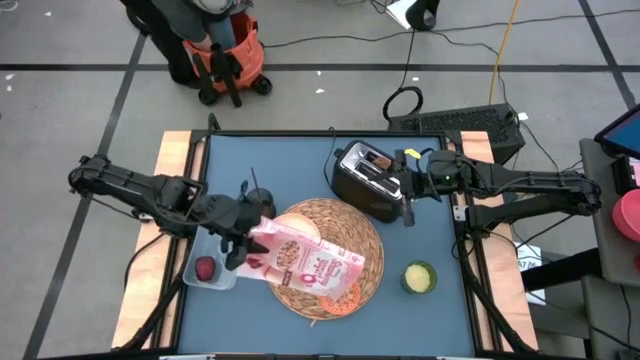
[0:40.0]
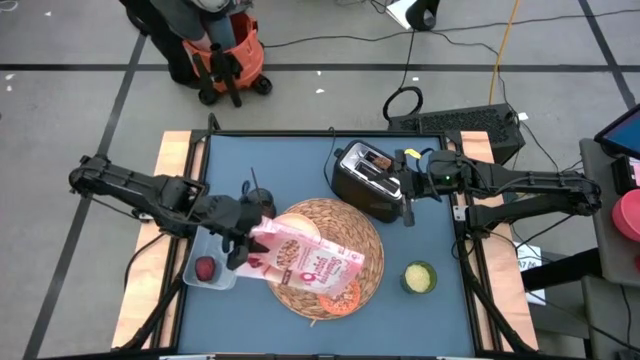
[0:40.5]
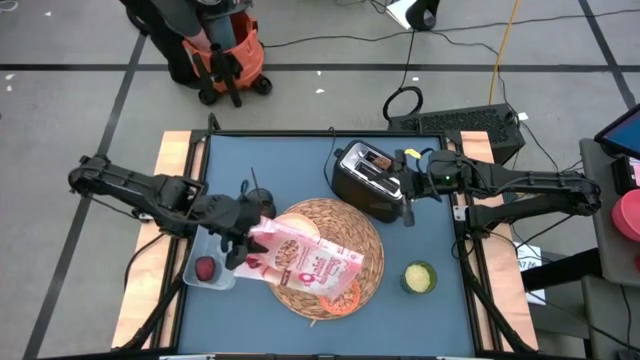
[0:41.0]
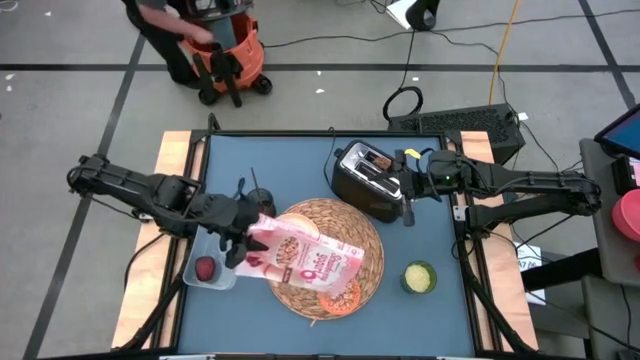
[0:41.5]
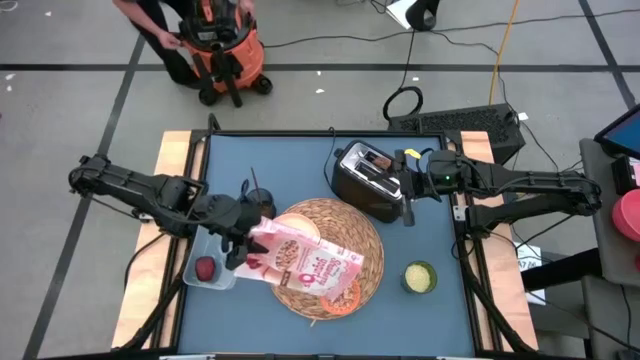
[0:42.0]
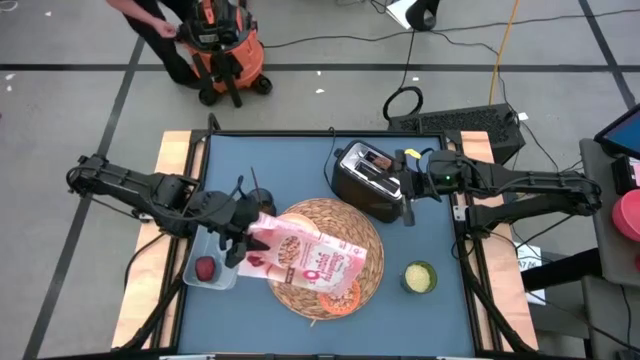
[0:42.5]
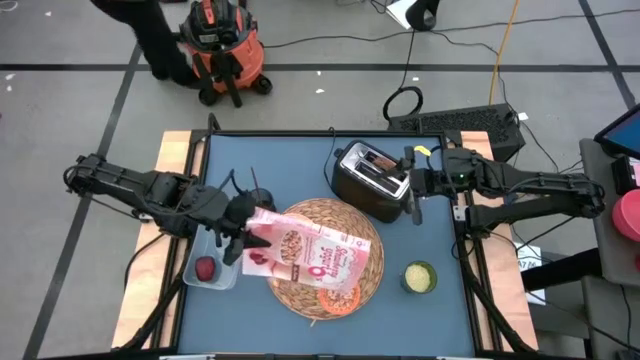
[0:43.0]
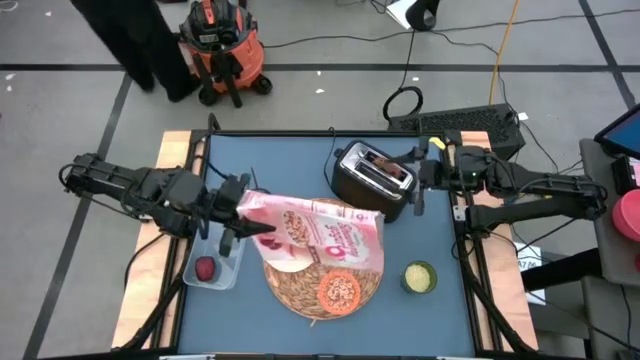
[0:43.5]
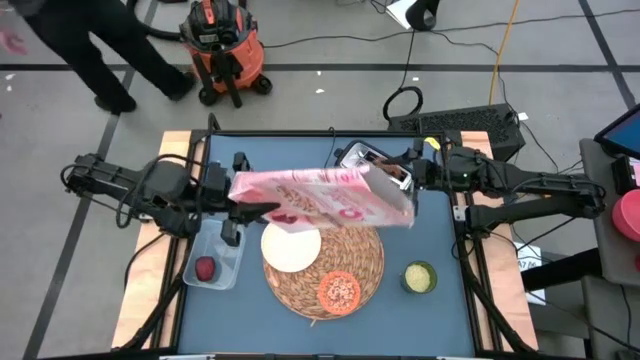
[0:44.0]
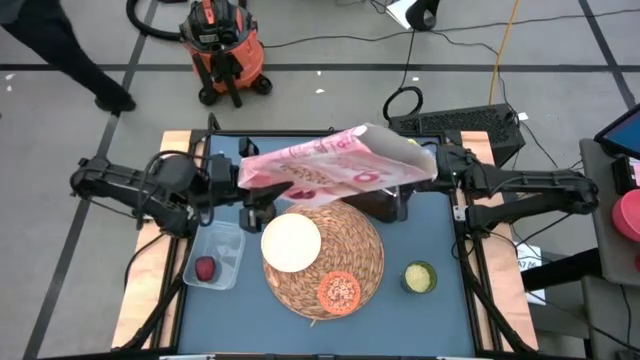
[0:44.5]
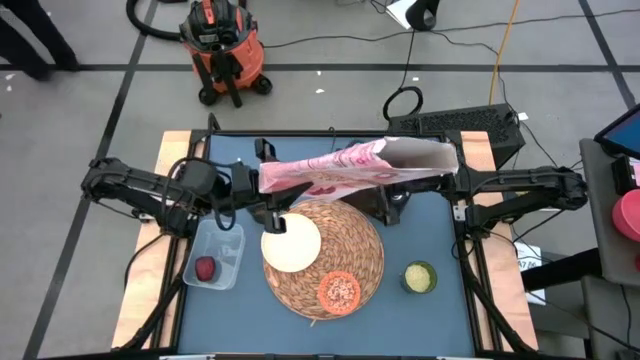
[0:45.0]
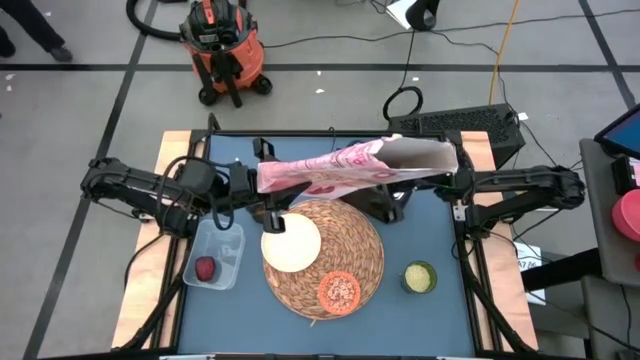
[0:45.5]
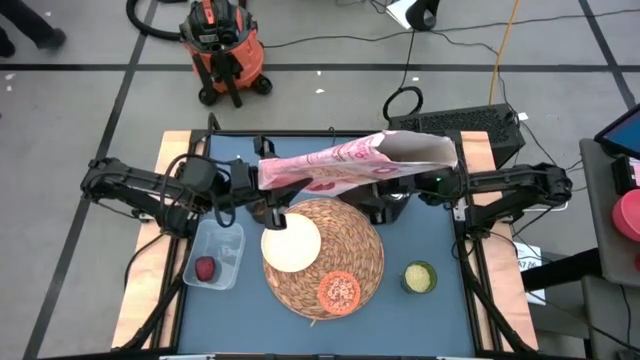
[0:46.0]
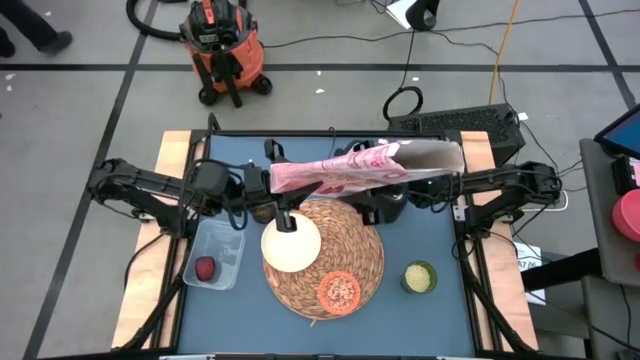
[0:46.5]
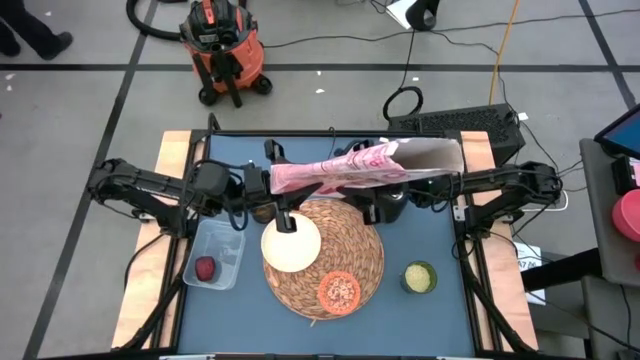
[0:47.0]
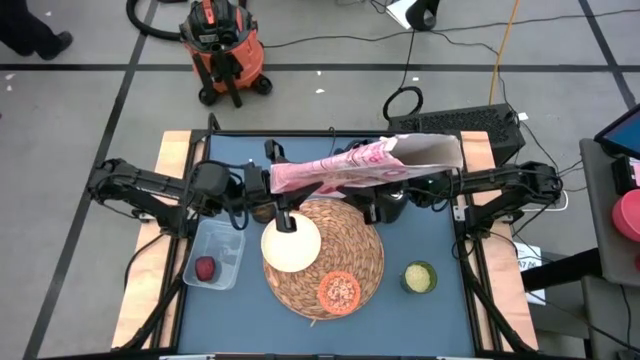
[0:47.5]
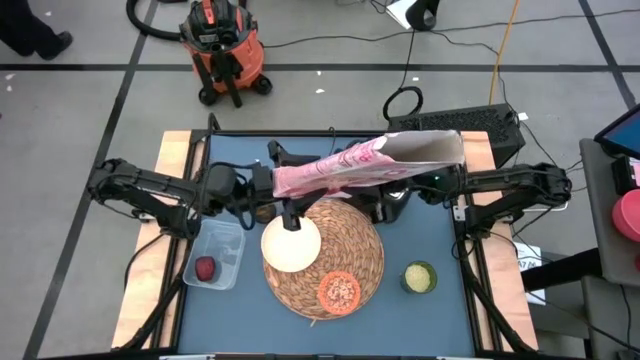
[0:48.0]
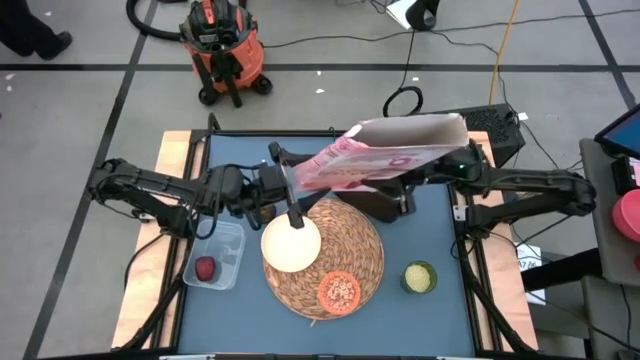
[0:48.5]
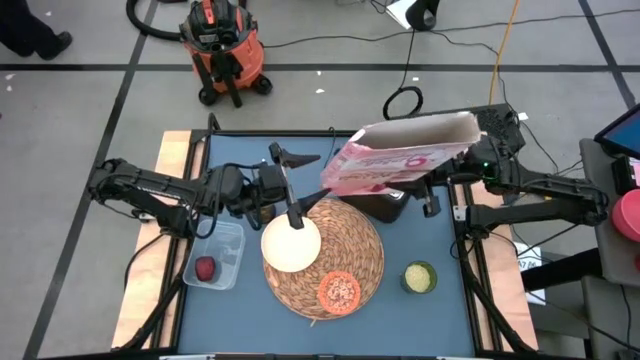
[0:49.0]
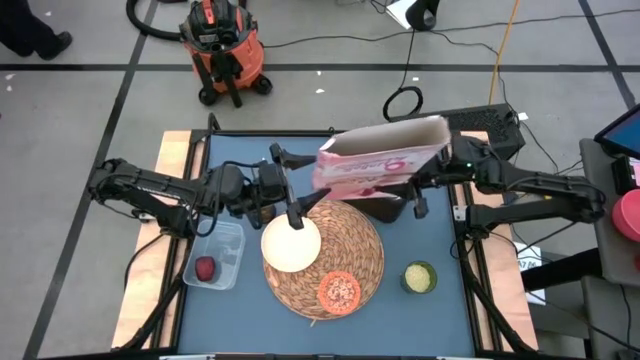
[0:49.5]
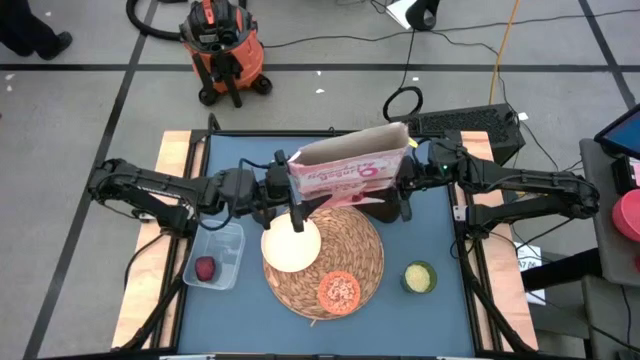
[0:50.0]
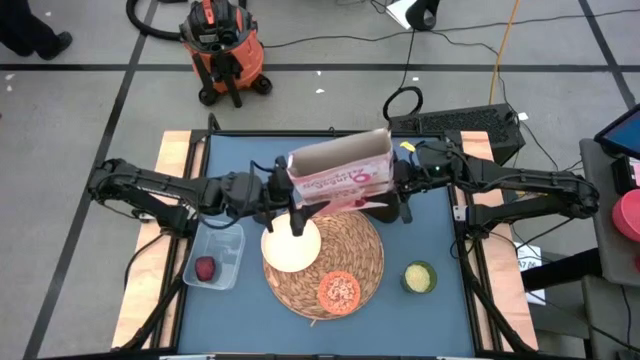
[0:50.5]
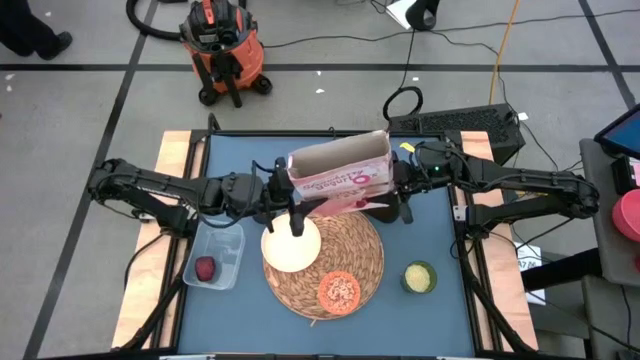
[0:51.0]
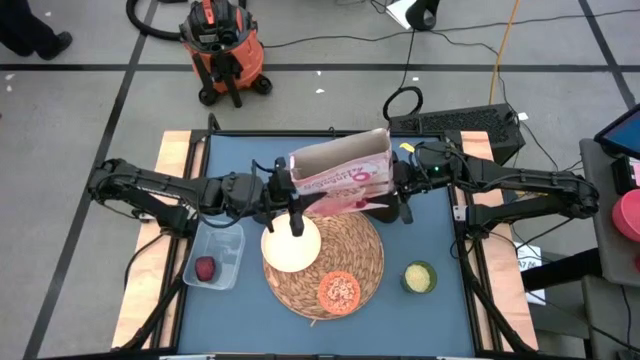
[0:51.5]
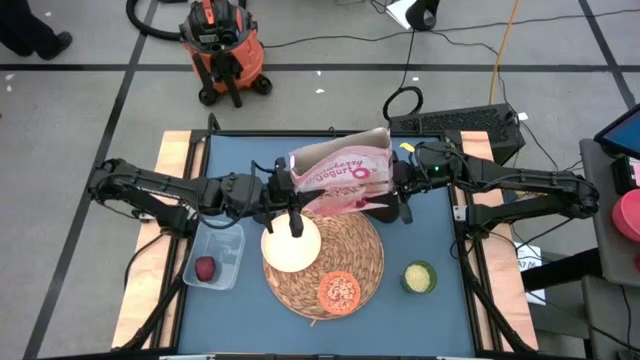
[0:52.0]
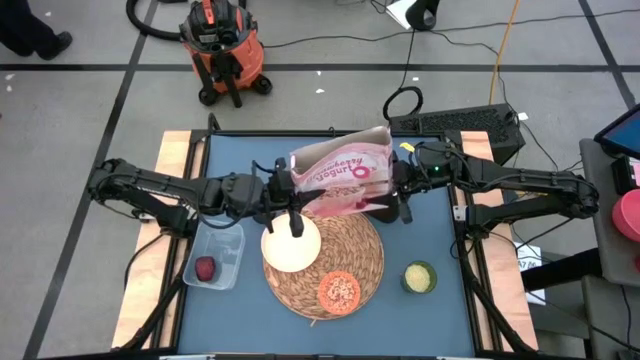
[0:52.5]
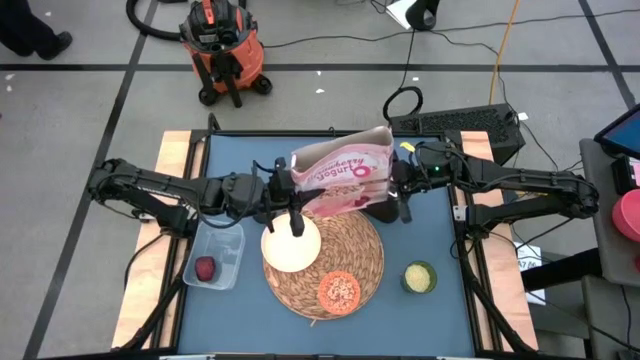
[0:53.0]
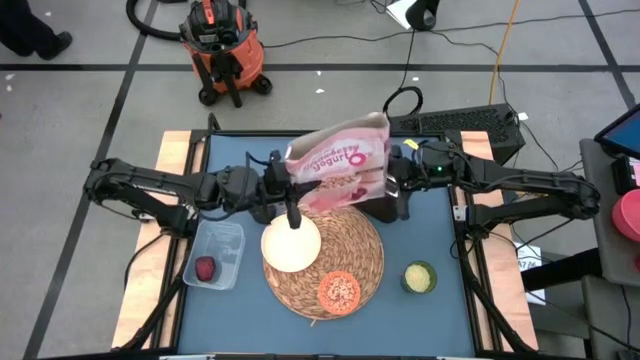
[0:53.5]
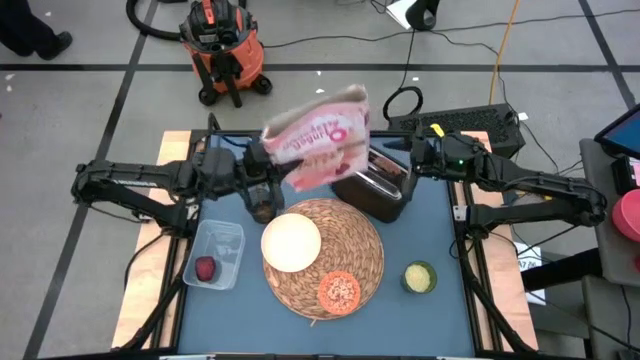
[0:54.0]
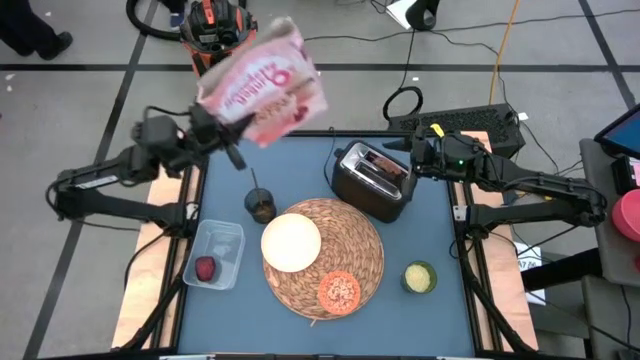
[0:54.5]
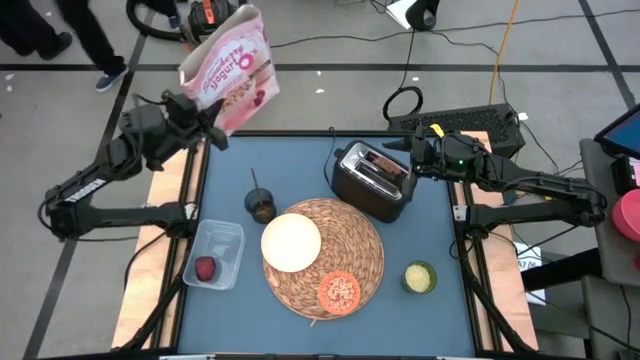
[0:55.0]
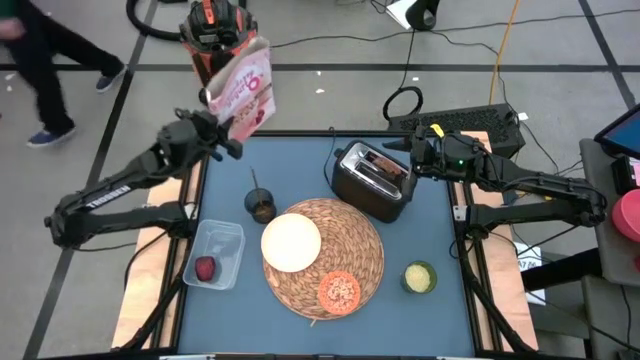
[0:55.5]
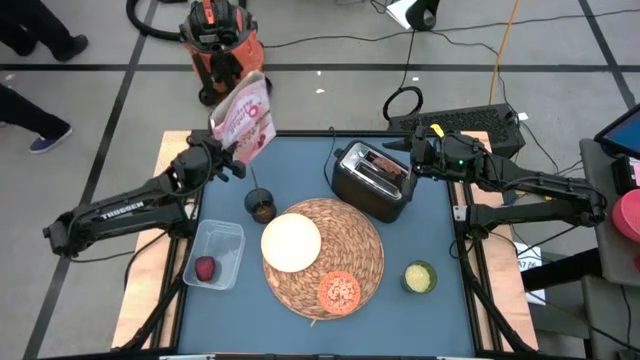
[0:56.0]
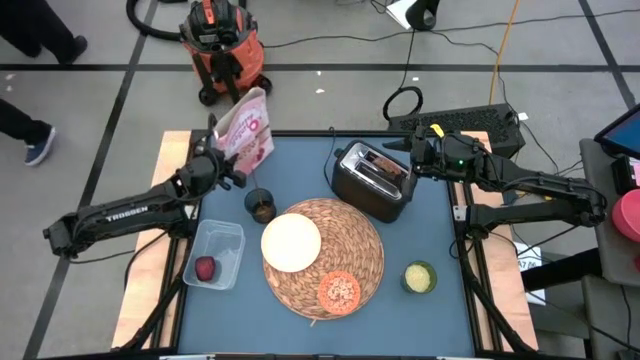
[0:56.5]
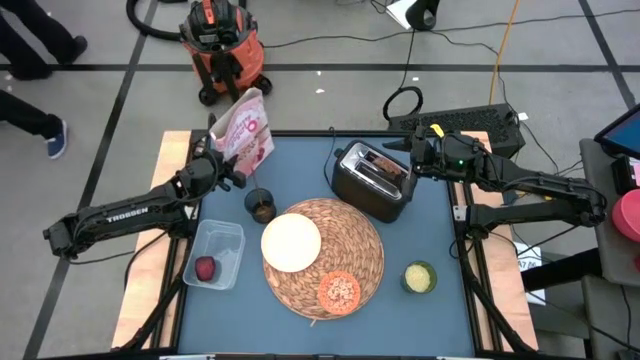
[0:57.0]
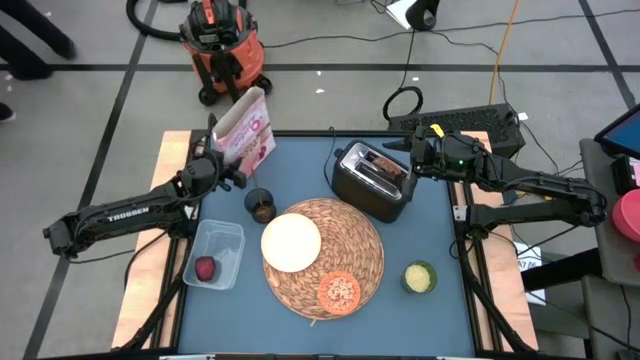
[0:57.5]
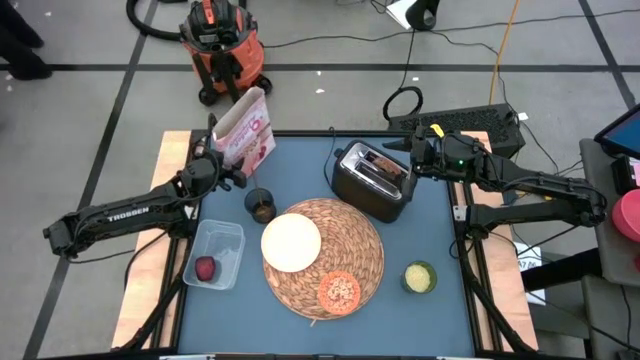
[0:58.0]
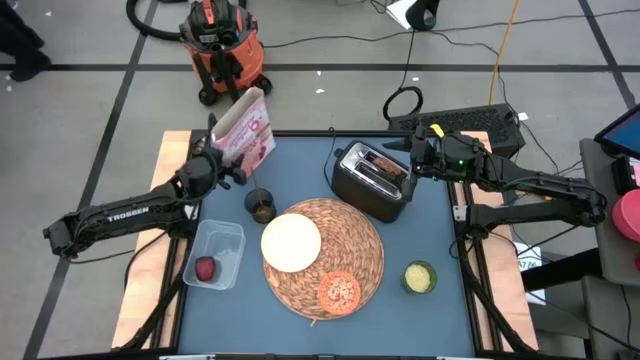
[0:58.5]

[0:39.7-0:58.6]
Task: Arrange a breakfast setting
Pour the cereal into the orange bowl
